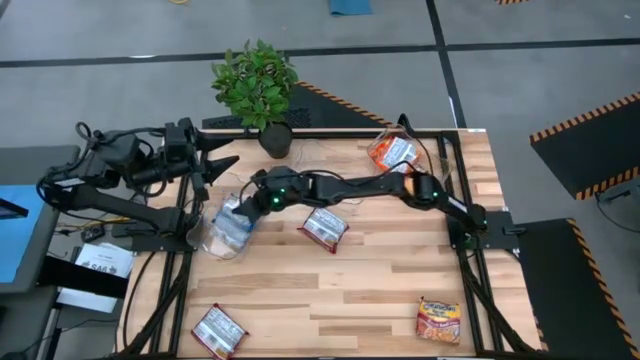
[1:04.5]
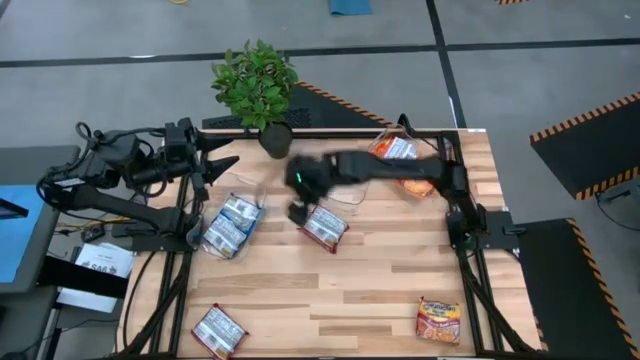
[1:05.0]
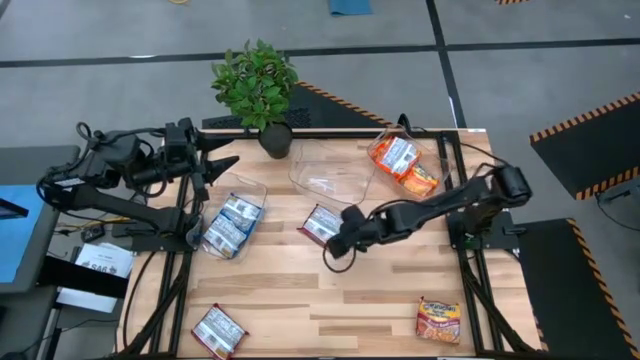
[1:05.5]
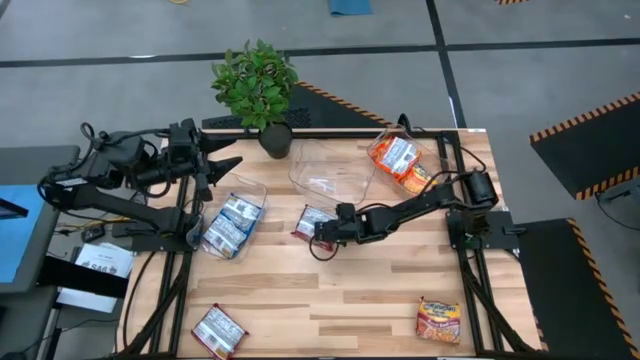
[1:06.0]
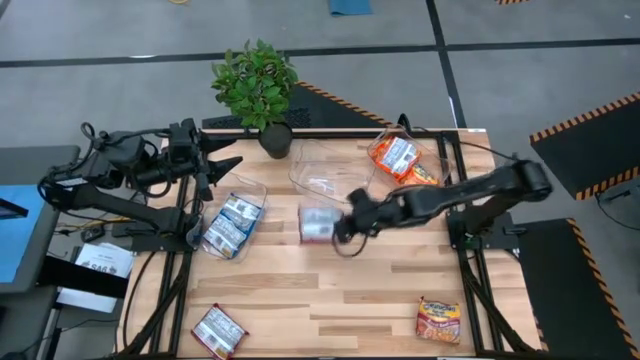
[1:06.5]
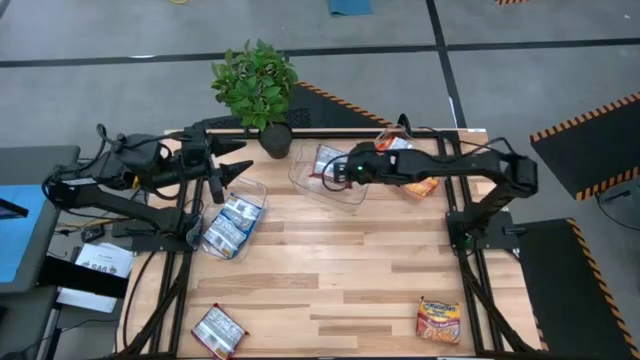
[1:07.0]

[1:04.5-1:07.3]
Task: Sort Maruchan noodles
Put the top red noodle pack into the middle transparent bin

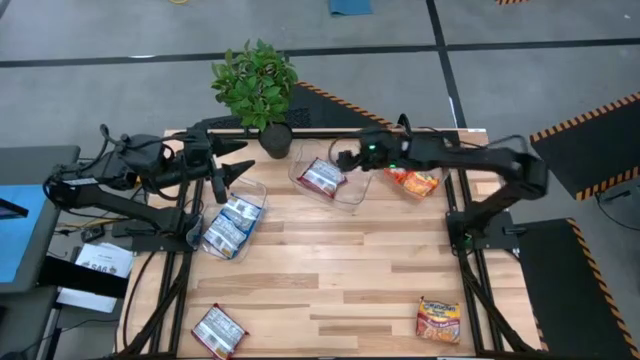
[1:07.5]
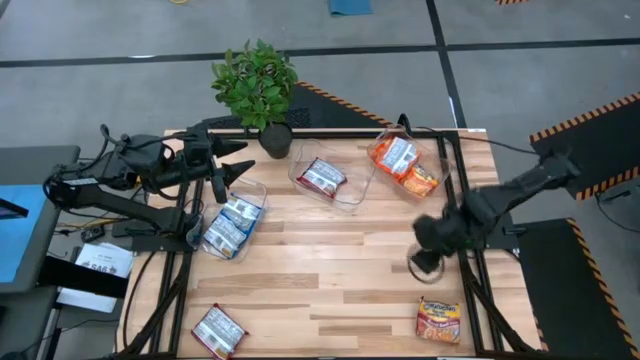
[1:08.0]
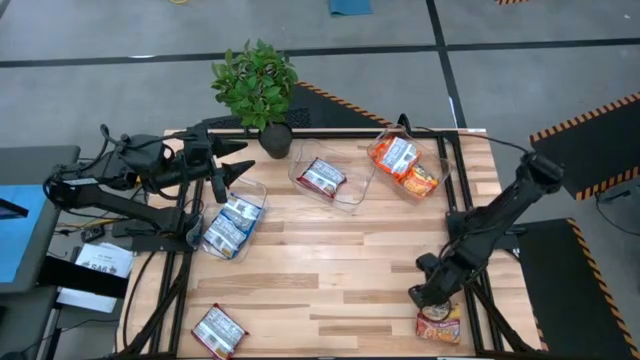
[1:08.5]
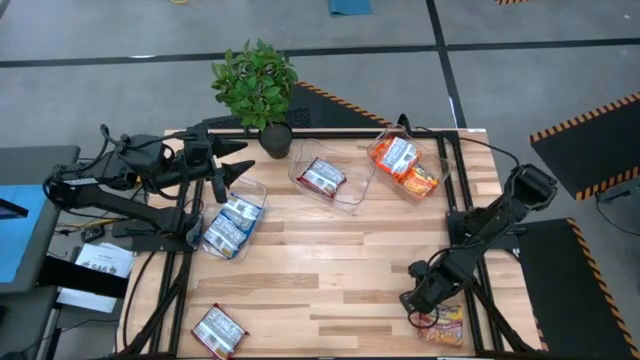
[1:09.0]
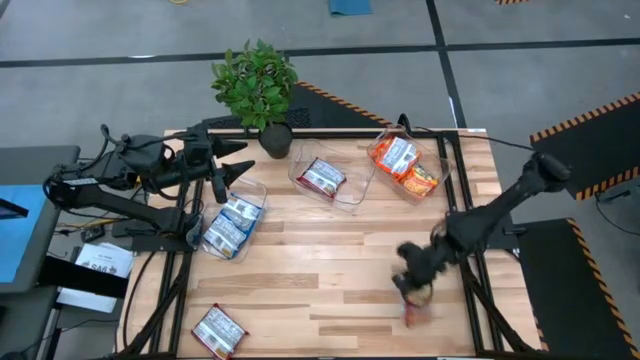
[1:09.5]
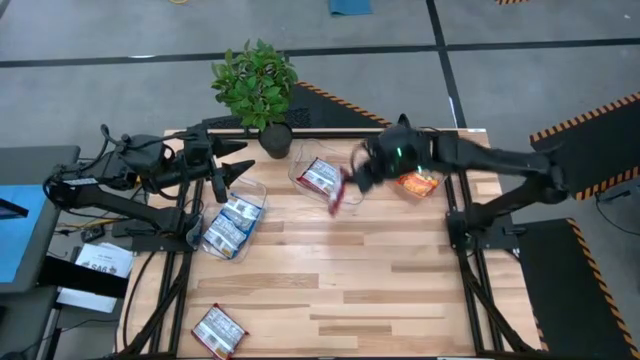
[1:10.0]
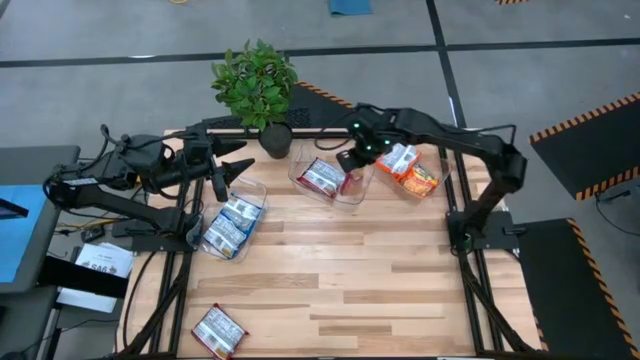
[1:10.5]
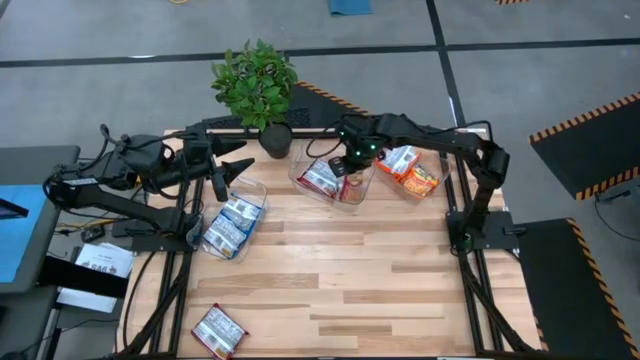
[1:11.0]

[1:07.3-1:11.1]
Put the right red noodle pack into the middle transparent bin

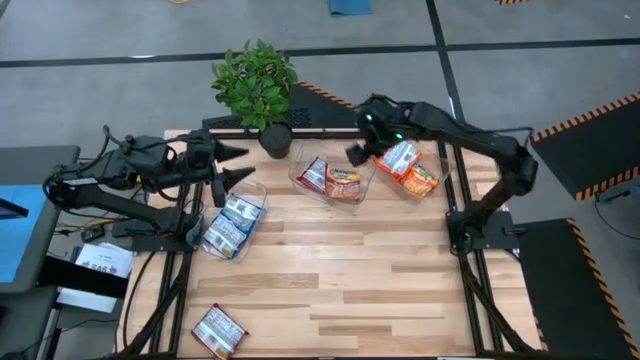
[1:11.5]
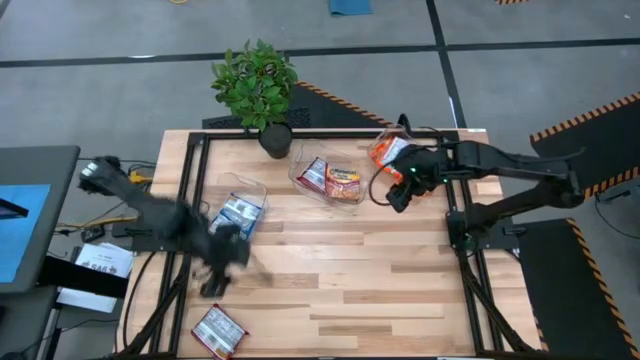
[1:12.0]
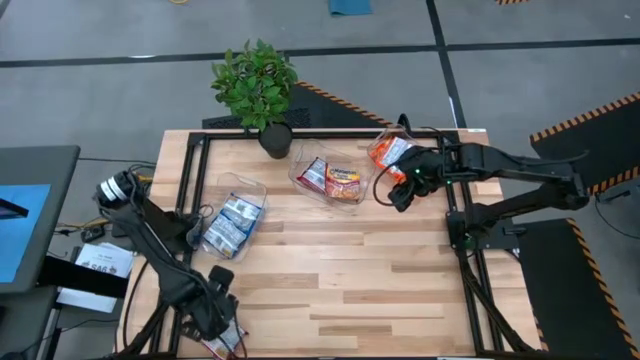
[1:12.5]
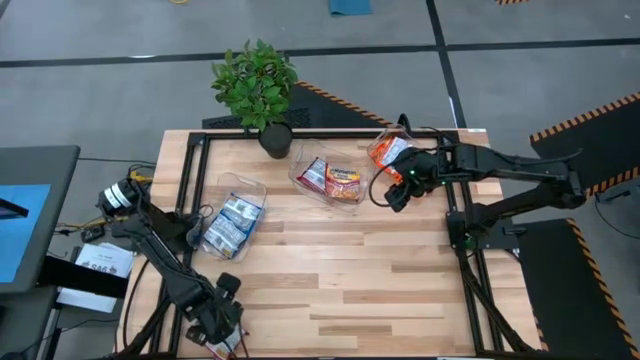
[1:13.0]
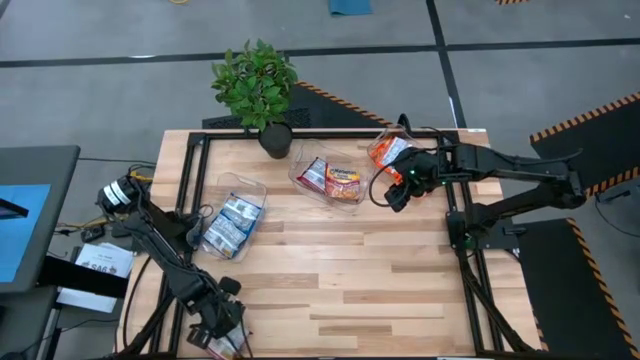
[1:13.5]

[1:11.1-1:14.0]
Put the red noodle pack into the middle transparent bin

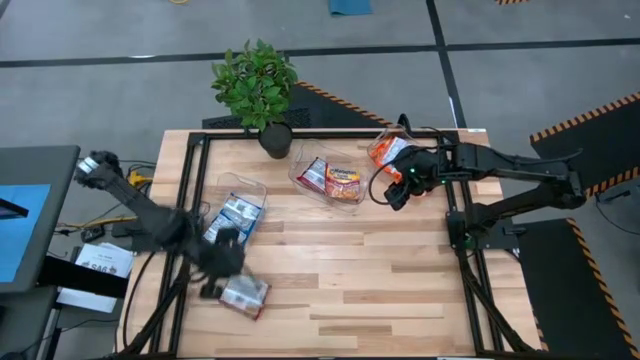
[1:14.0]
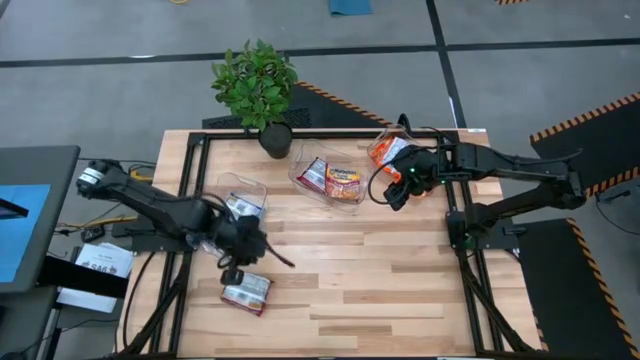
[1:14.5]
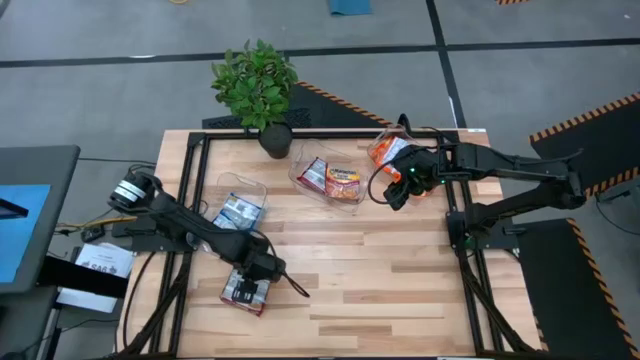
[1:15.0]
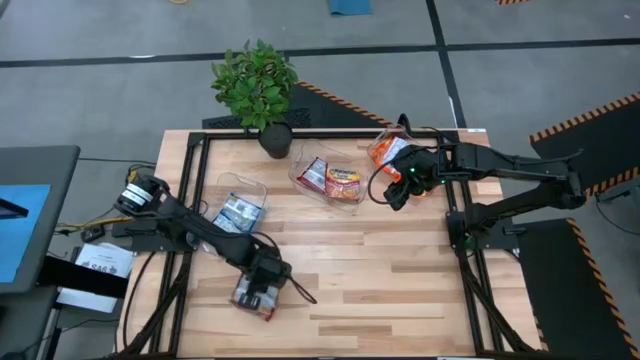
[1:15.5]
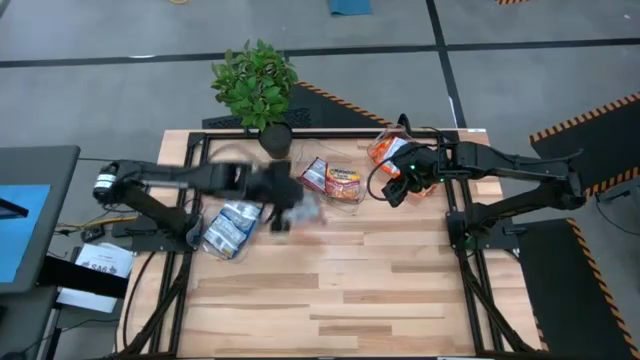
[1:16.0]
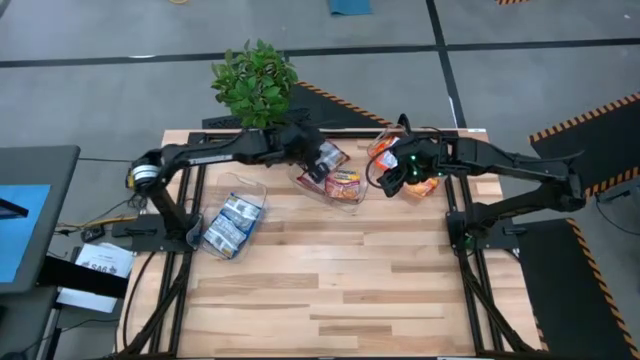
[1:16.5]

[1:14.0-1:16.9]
Put the red noodle pack into the middle transparent bin

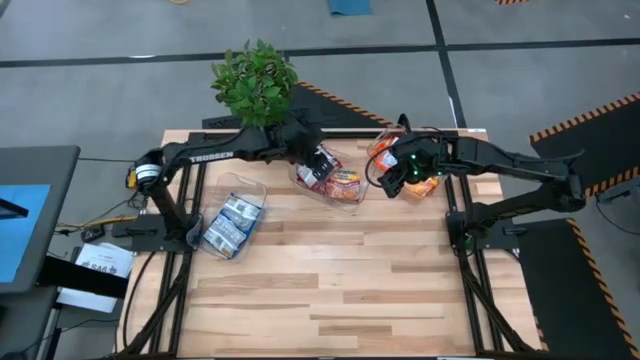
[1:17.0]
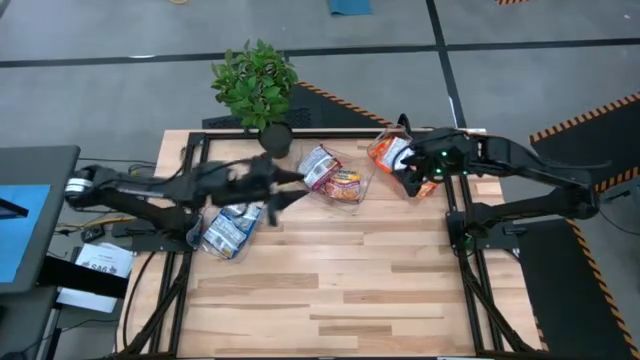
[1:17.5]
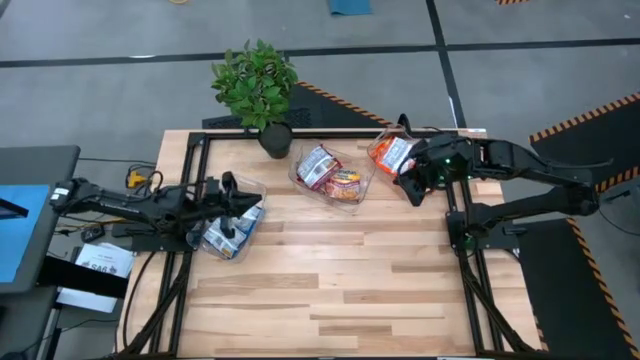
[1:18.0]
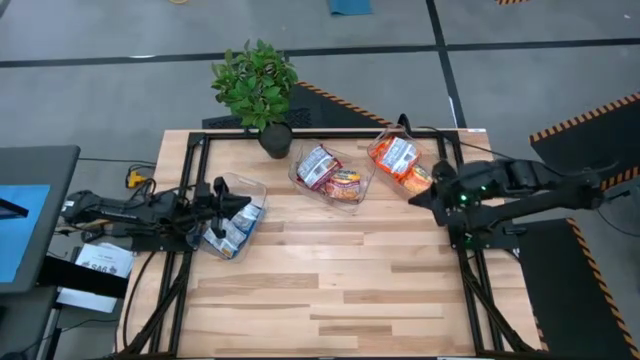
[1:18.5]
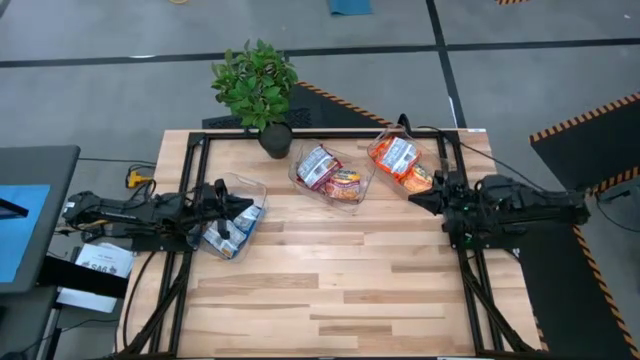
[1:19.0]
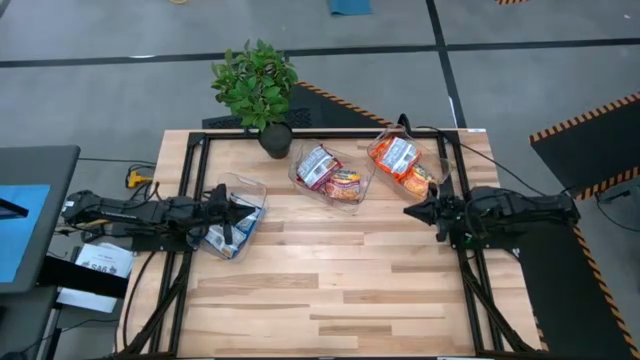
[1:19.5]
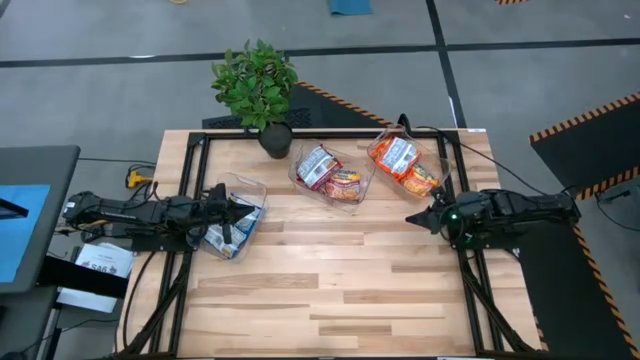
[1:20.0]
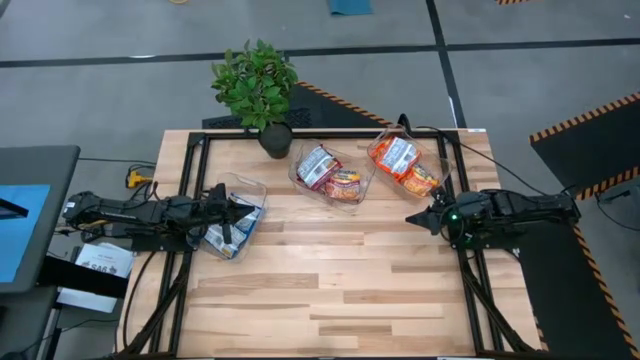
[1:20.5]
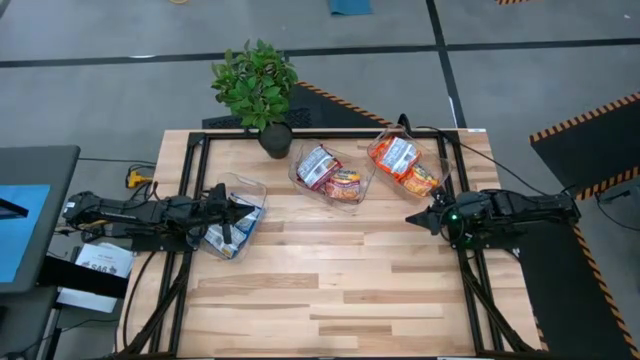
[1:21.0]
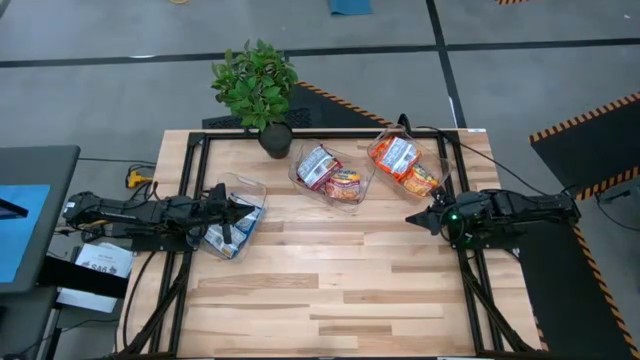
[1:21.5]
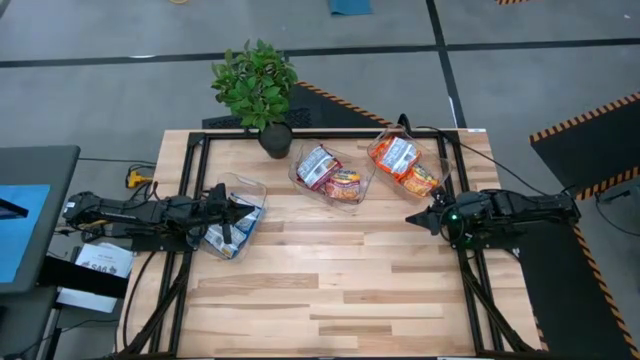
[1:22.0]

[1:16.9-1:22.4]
Return to Home Position

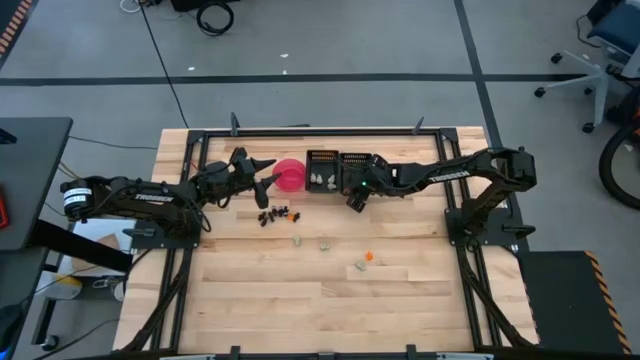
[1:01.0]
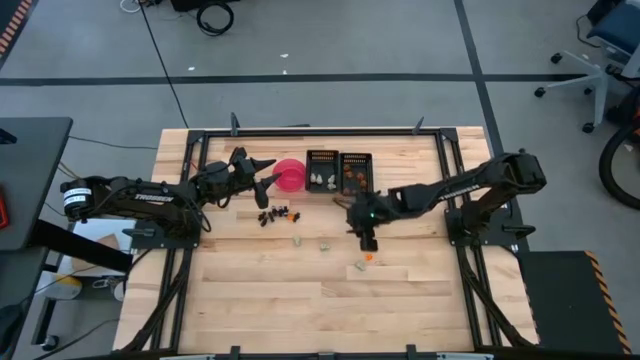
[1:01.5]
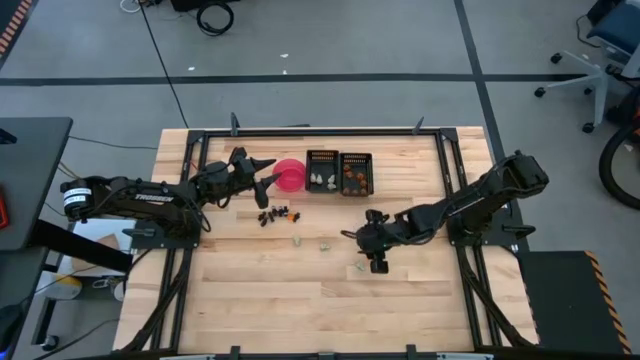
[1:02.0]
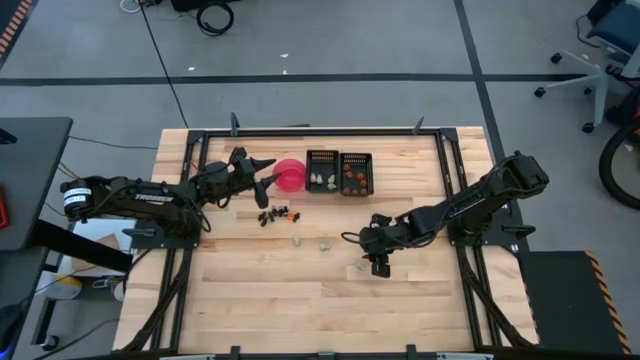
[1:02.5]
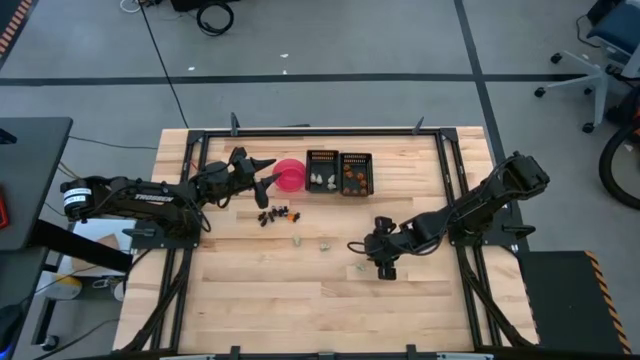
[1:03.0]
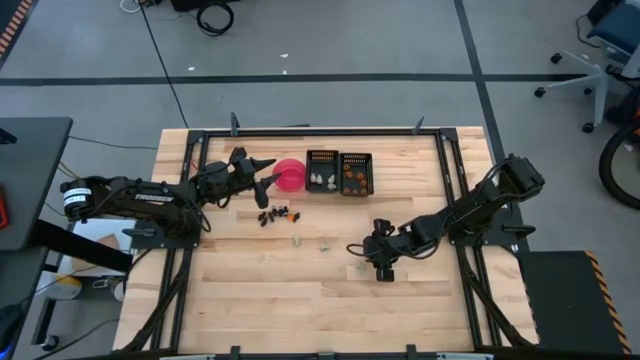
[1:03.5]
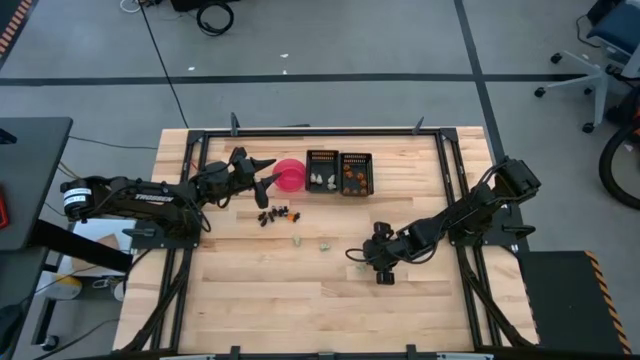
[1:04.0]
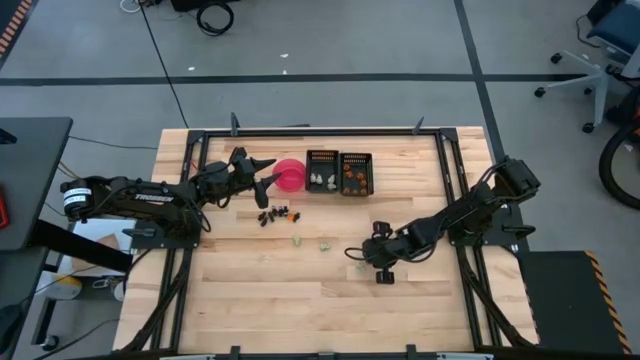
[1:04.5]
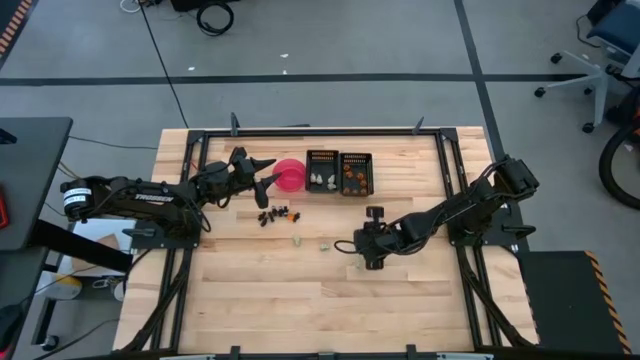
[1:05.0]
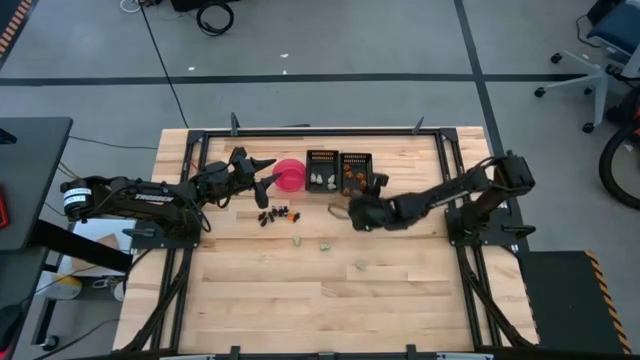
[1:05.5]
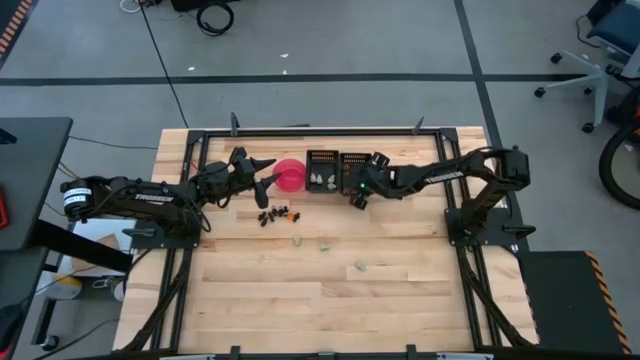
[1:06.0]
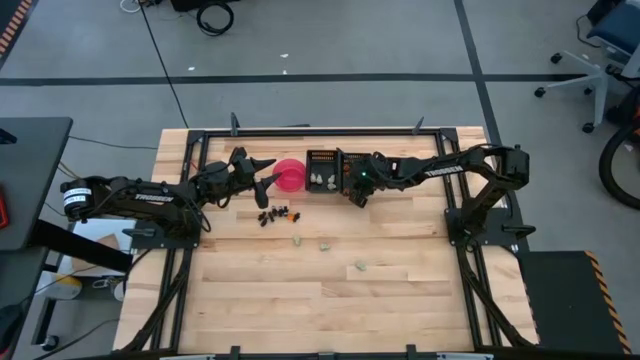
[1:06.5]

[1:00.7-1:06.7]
Task: Sort Halloween decoration
Put the orange pumpkin toy into the right black bin
